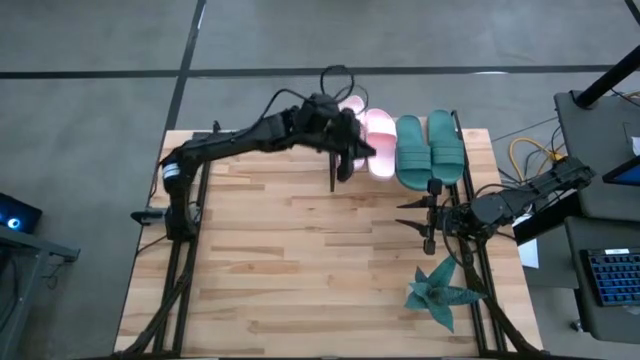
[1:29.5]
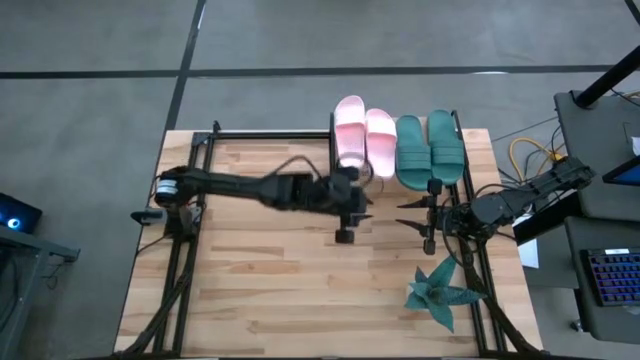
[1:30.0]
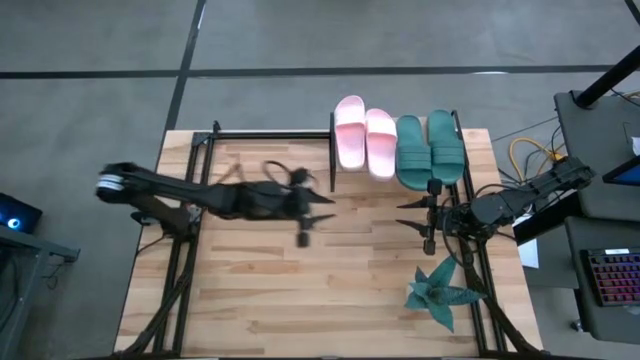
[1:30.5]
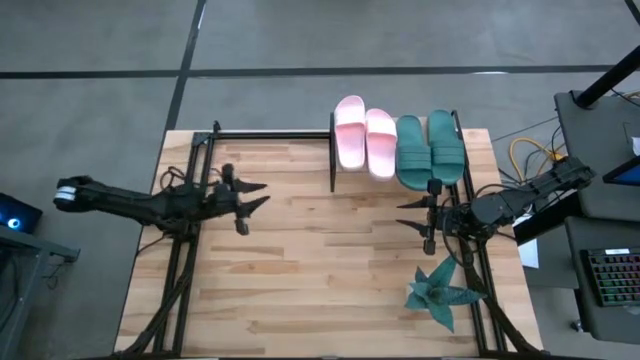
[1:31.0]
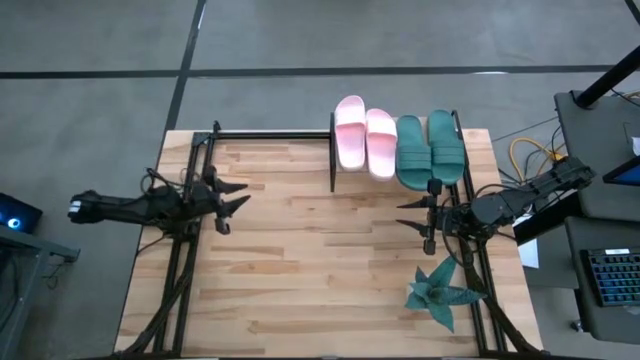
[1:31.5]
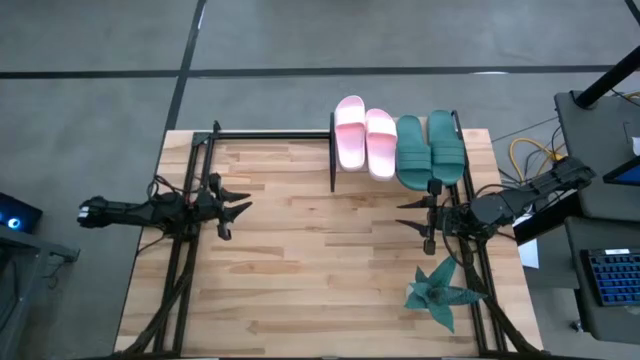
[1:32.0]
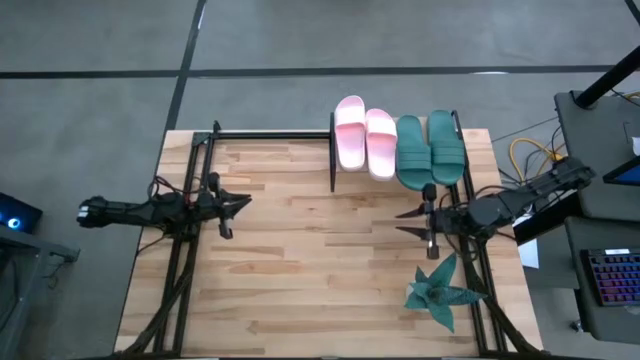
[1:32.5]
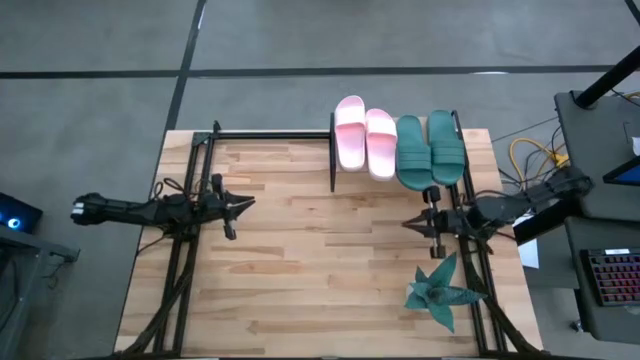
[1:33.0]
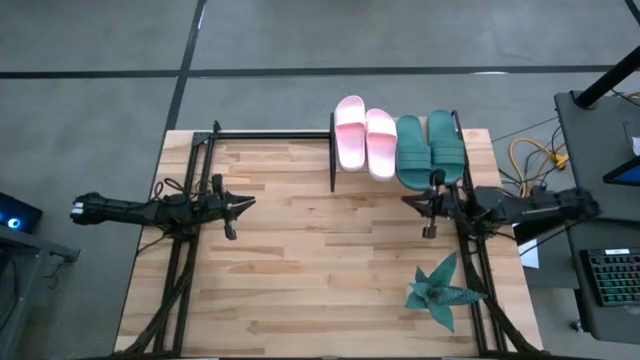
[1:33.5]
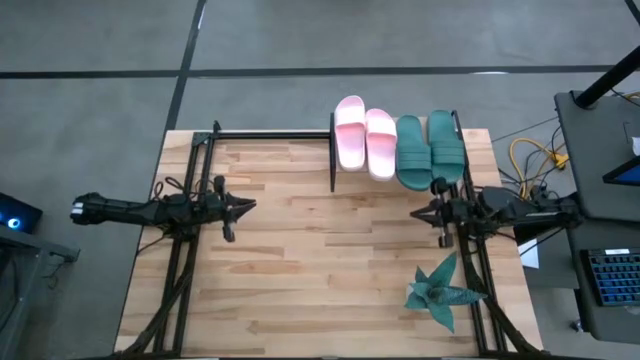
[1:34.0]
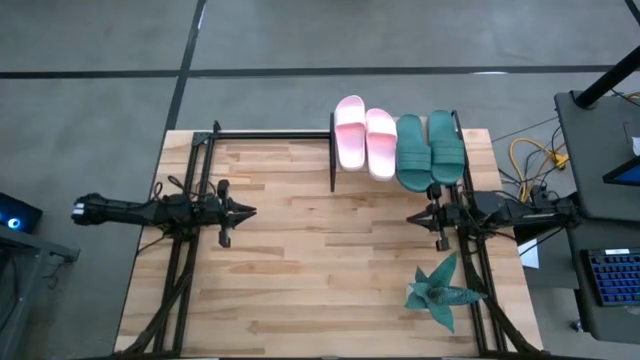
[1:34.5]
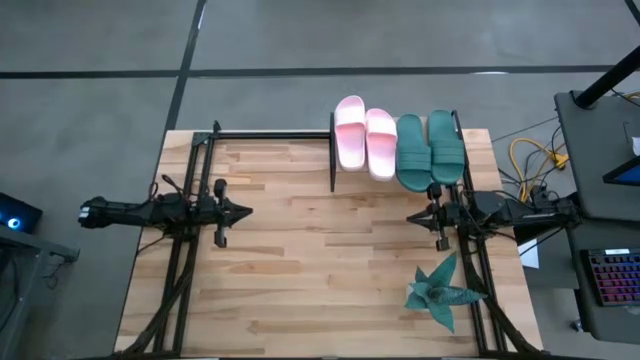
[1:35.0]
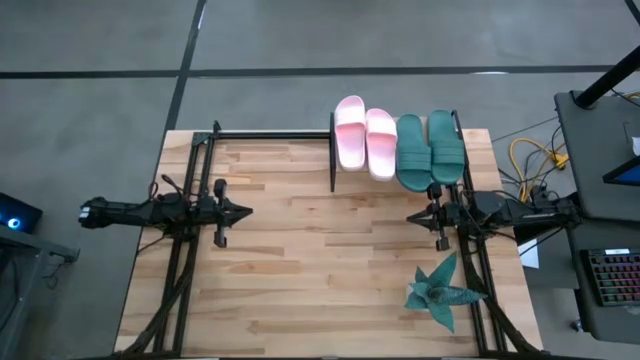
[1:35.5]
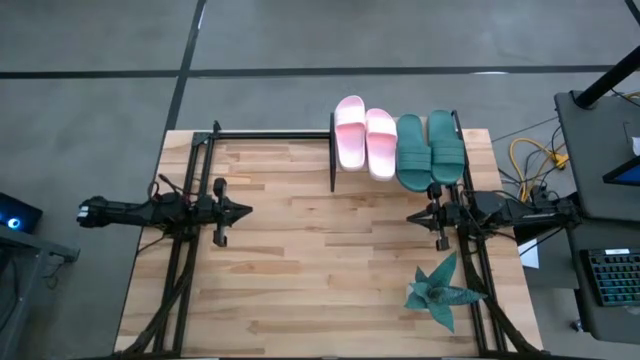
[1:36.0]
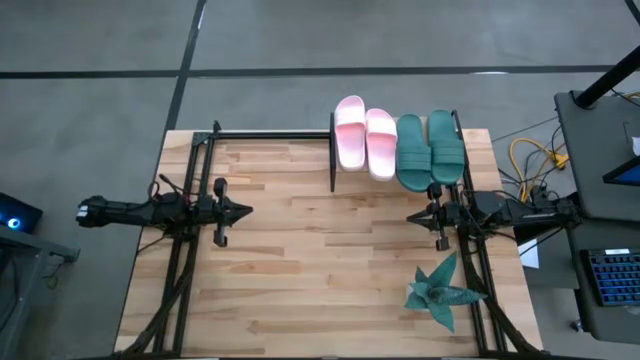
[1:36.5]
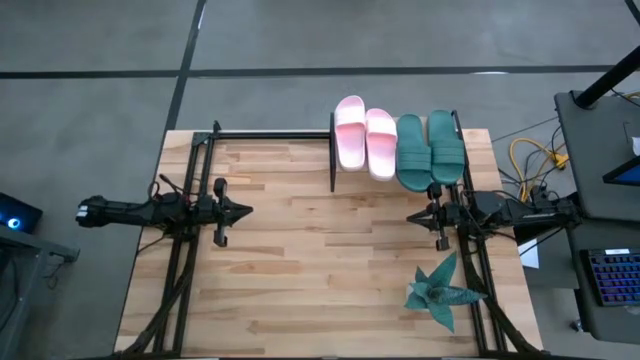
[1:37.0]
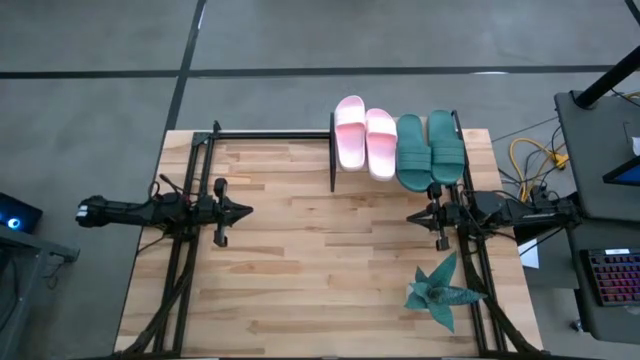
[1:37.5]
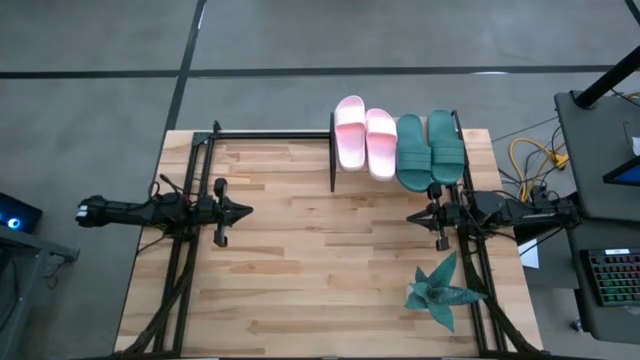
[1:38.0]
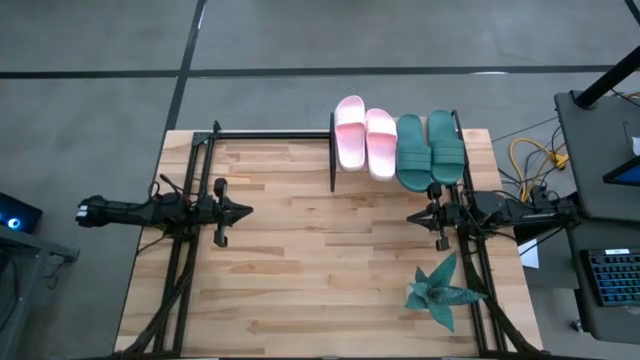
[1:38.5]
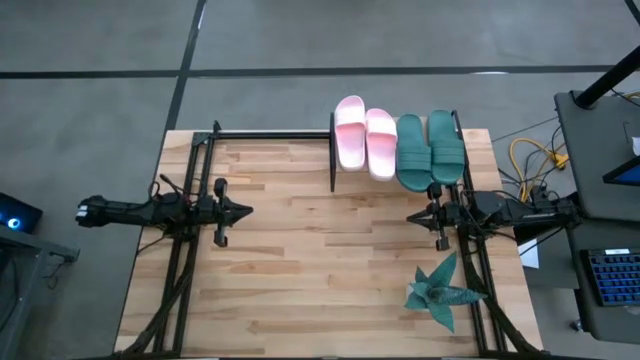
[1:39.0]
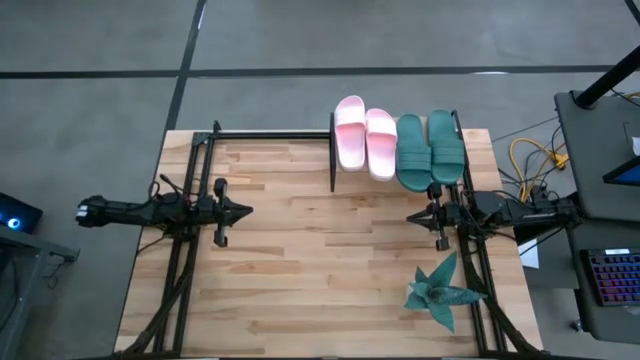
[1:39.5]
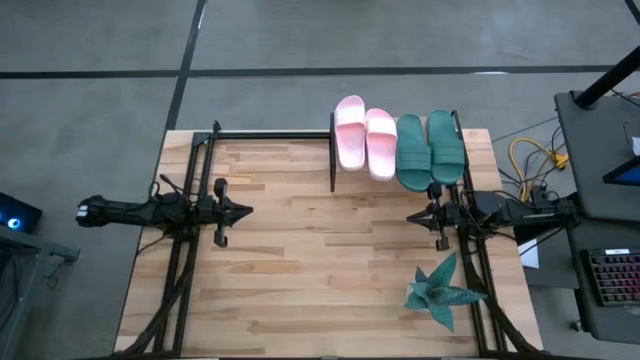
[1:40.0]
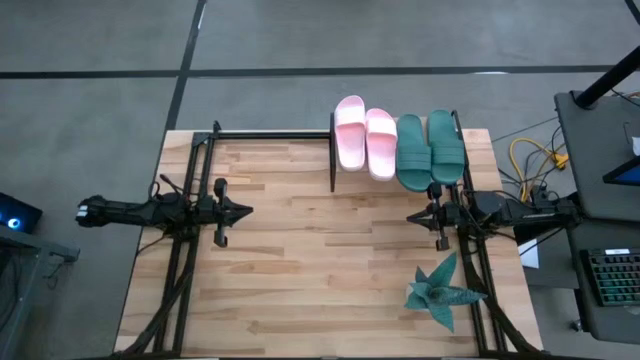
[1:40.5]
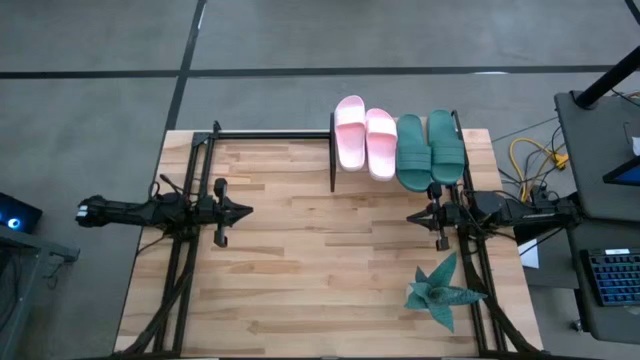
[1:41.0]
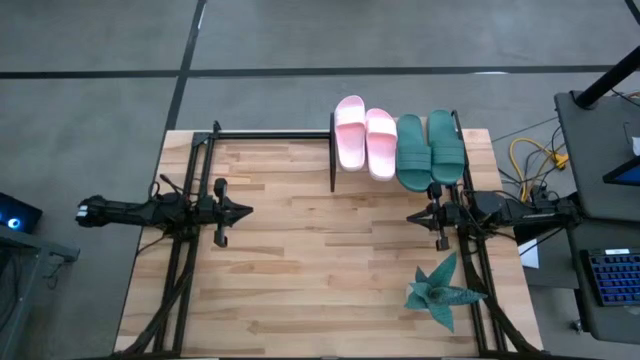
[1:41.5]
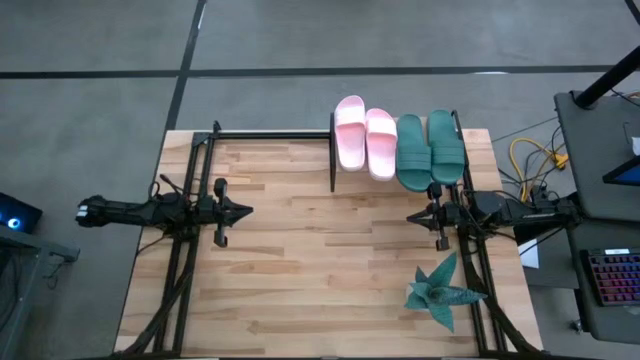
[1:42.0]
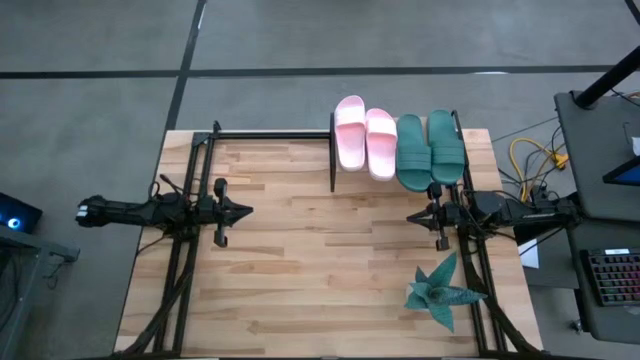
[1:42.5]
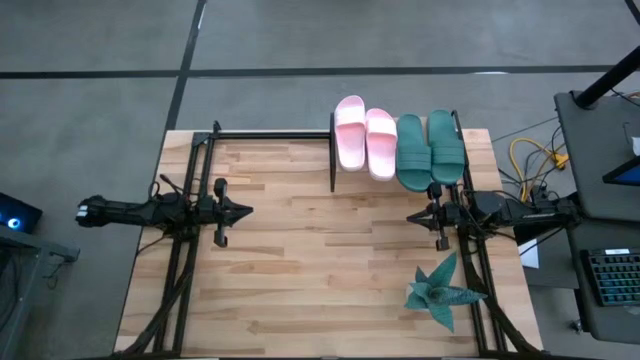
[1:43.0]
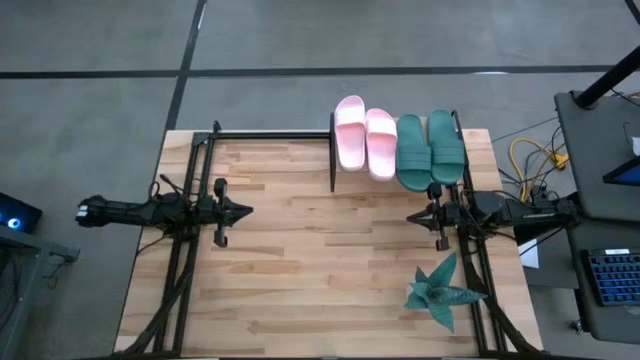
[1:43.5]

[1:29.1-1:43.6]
Task: Pick and place slides into the shelf
Return to Home Position

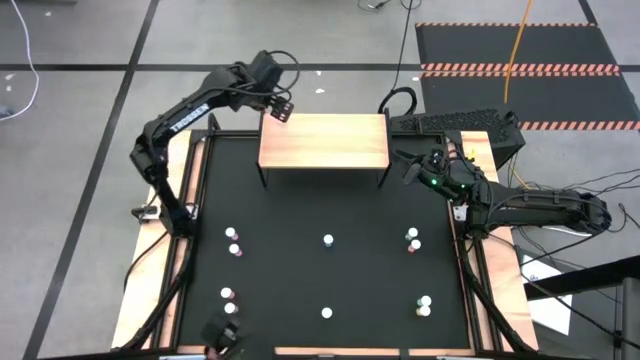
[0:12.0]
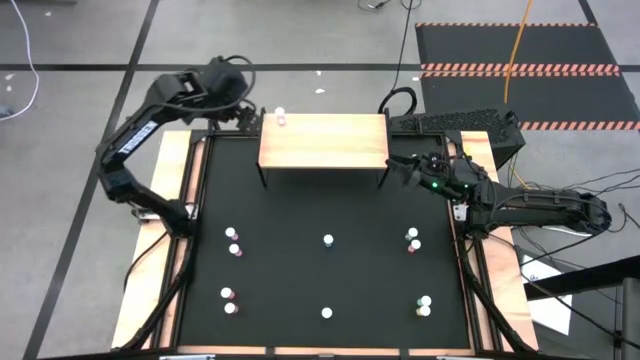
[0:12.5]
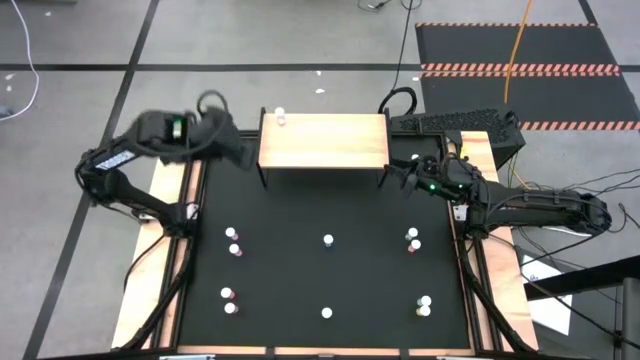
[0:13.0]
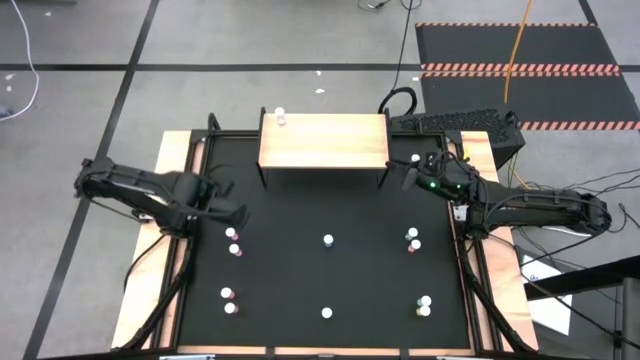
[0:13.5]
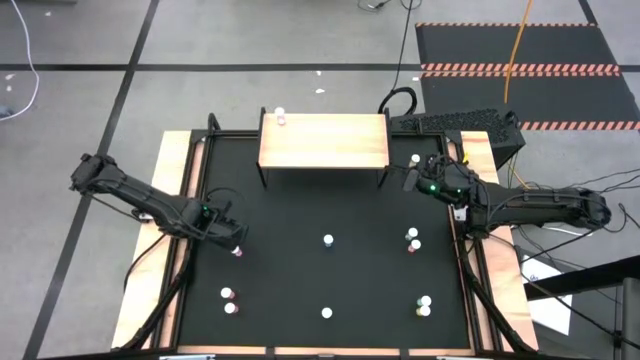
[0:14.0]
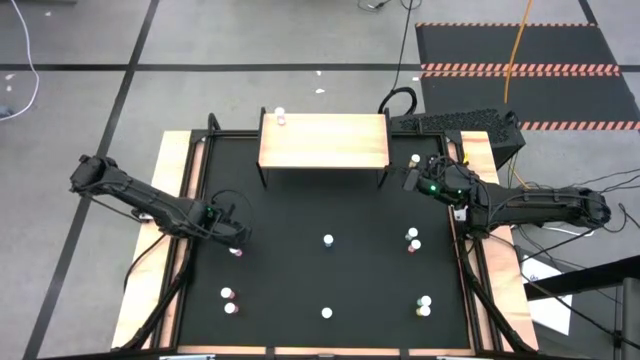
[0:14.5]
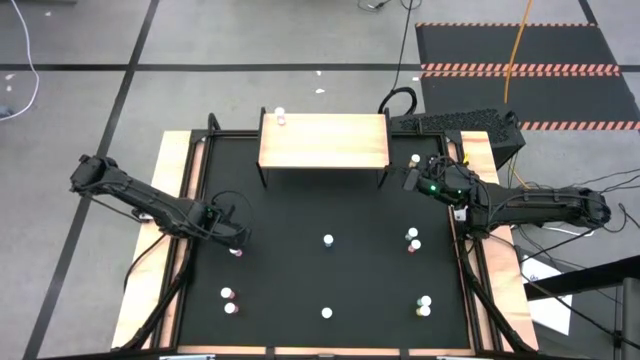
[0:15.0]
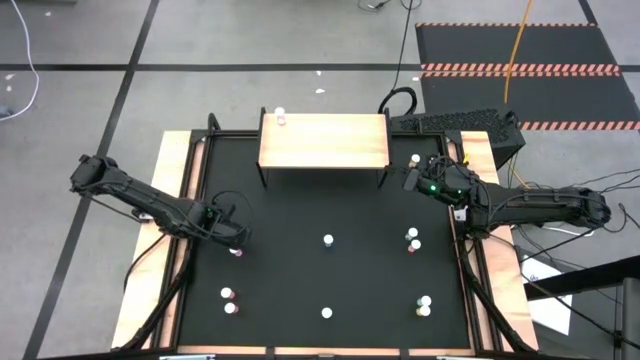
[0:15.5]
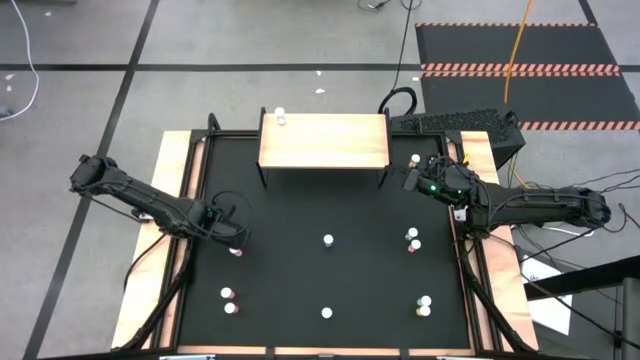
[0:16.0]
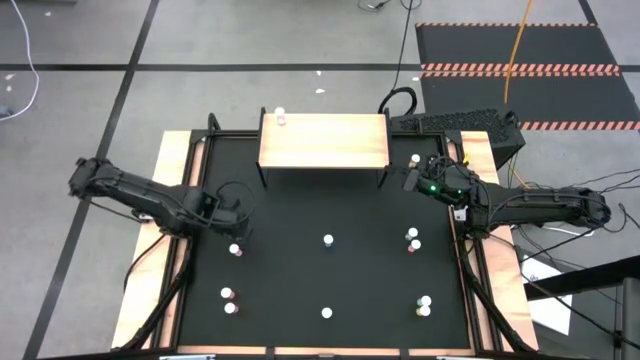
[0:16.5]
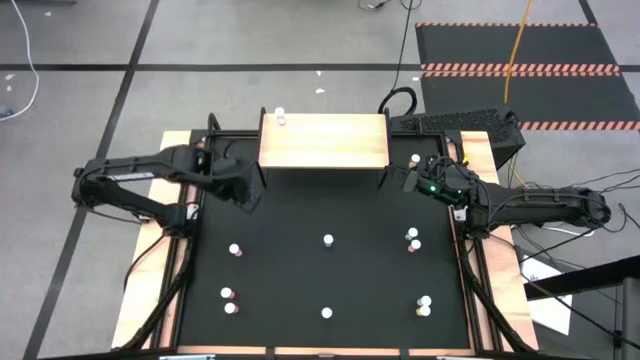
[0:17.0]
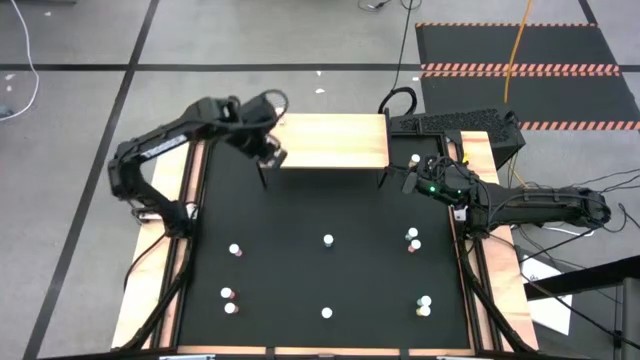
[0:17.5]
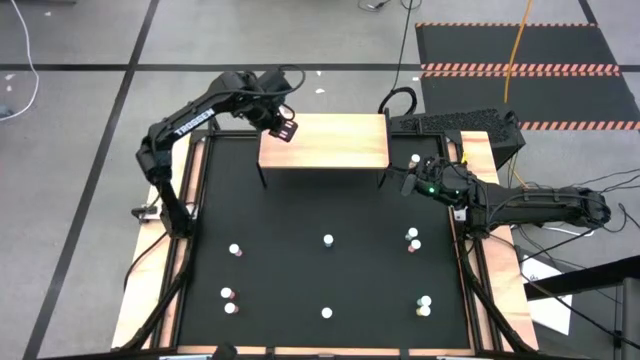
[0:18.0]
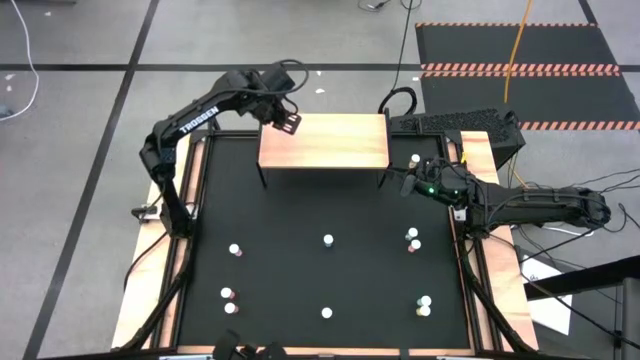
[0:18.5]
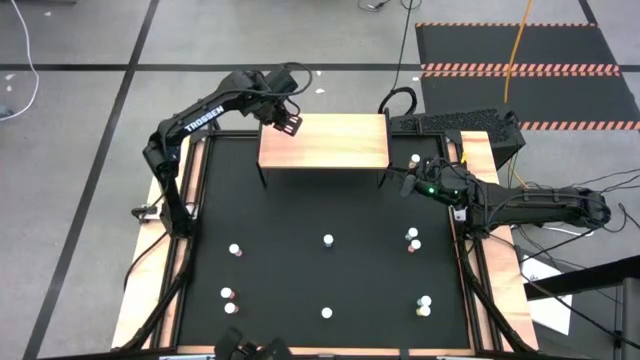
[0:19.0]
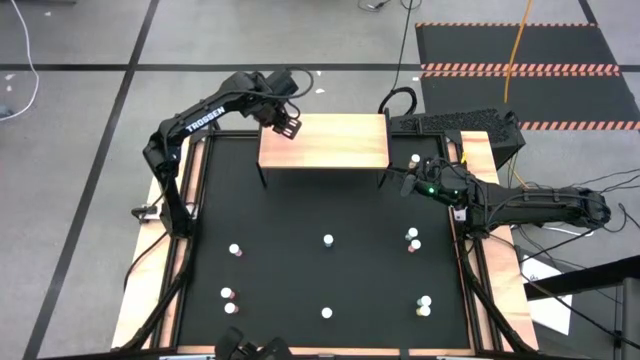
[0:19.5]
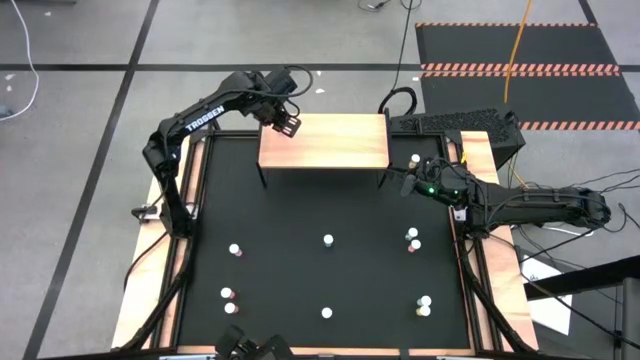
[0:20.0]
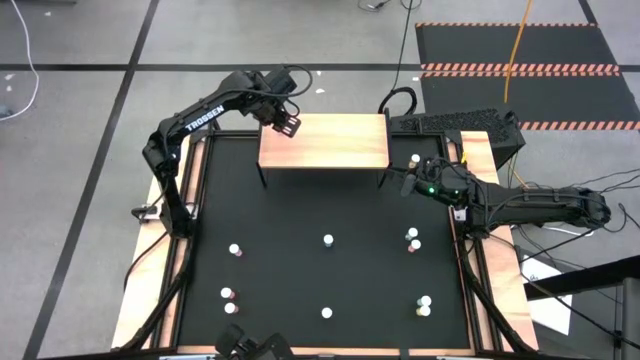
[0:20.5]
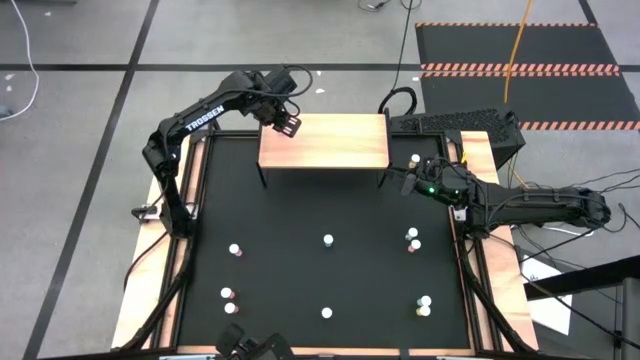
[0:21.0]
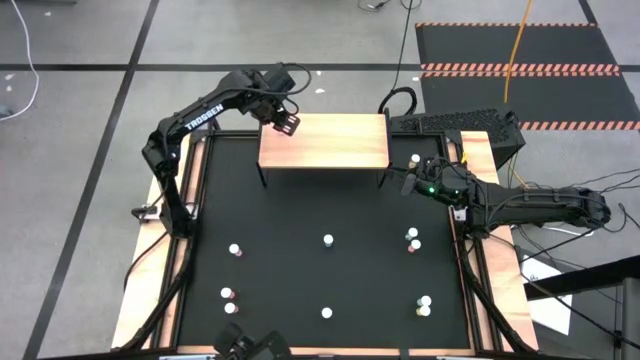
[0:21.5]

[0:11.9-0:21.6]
Task: Pick and place medicine bottles onto shelf by color
Put the top violet pill bottle on the shelf aligned with the other violet pill bottle
